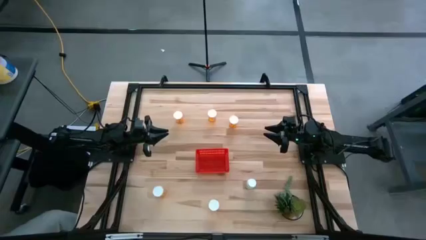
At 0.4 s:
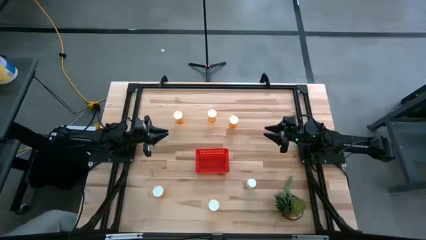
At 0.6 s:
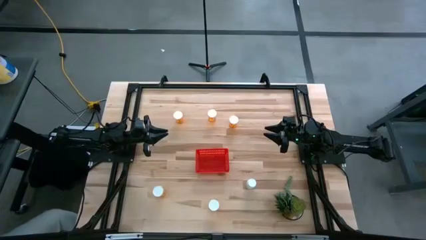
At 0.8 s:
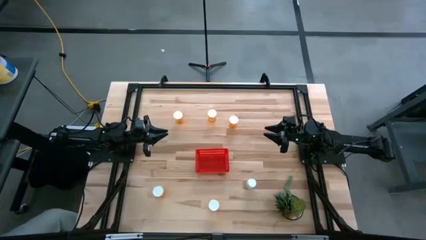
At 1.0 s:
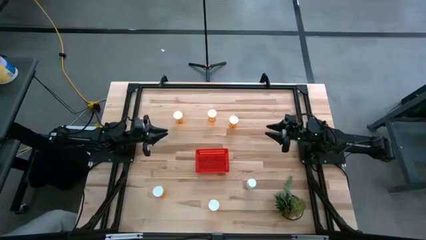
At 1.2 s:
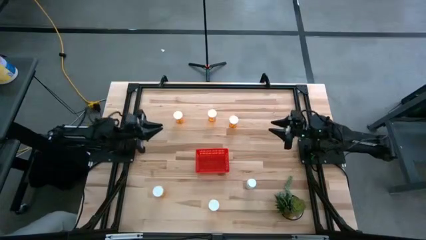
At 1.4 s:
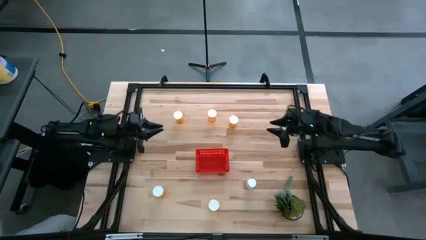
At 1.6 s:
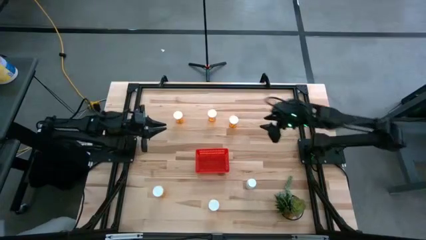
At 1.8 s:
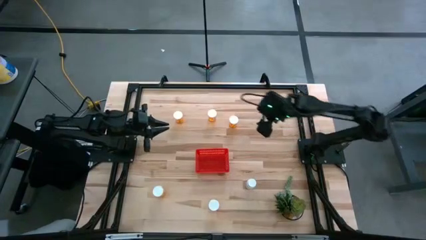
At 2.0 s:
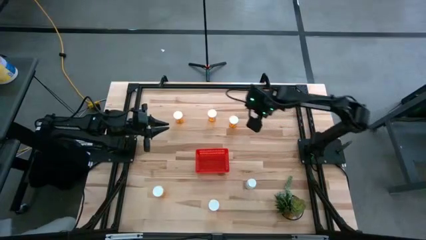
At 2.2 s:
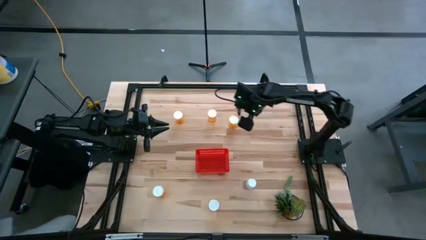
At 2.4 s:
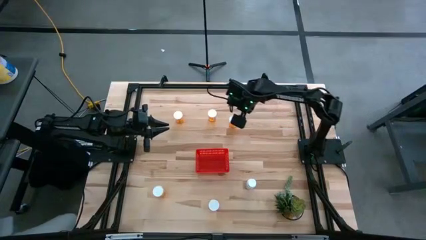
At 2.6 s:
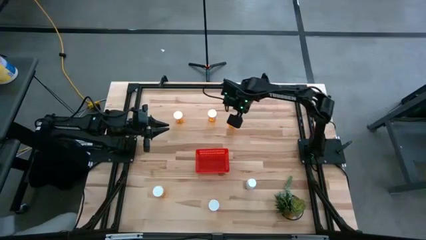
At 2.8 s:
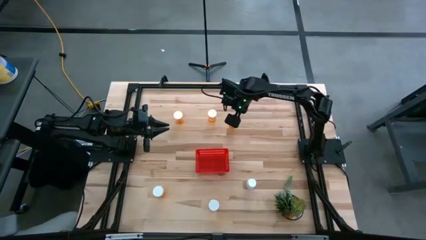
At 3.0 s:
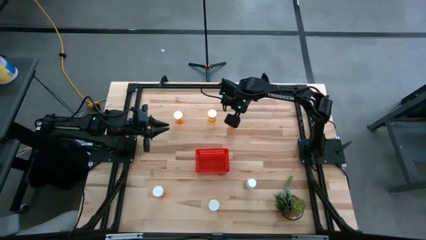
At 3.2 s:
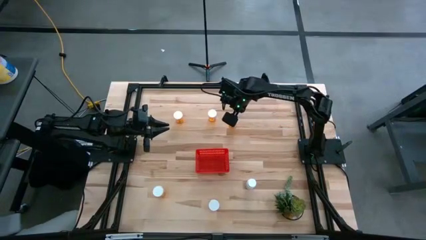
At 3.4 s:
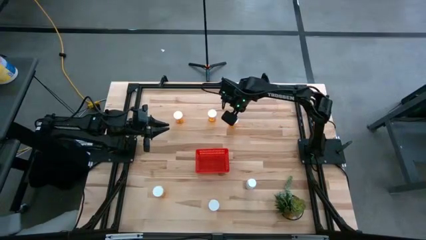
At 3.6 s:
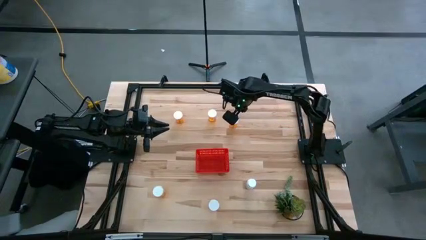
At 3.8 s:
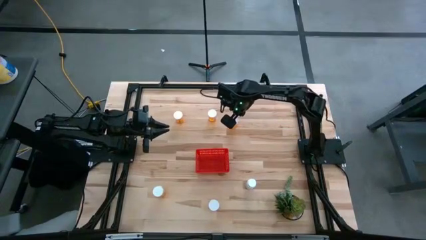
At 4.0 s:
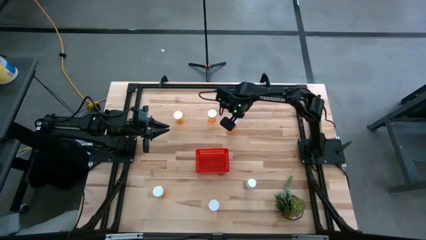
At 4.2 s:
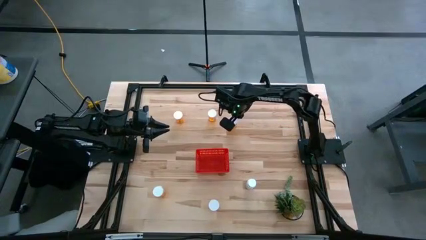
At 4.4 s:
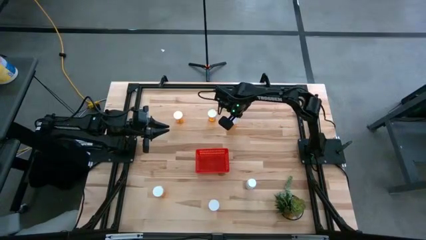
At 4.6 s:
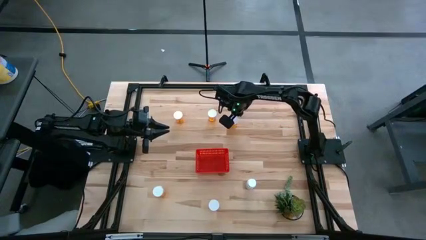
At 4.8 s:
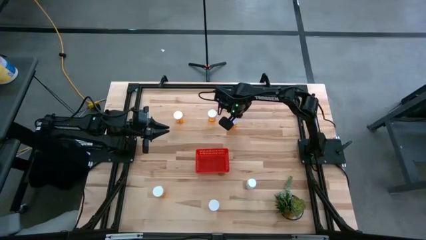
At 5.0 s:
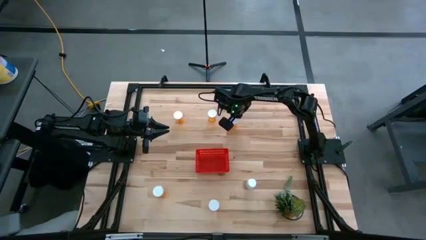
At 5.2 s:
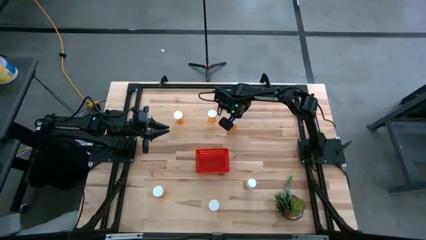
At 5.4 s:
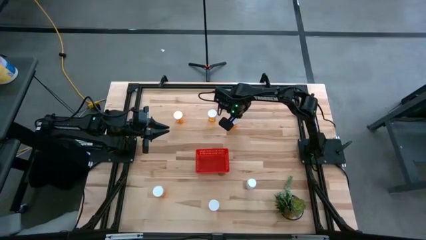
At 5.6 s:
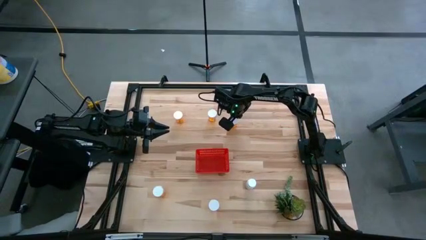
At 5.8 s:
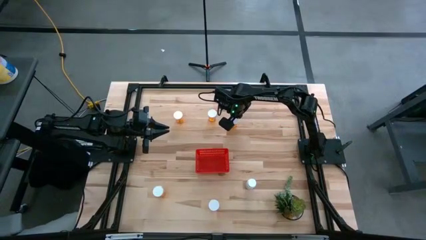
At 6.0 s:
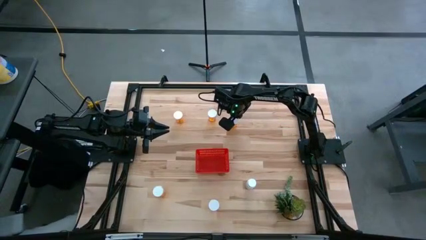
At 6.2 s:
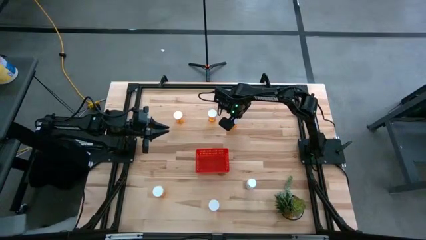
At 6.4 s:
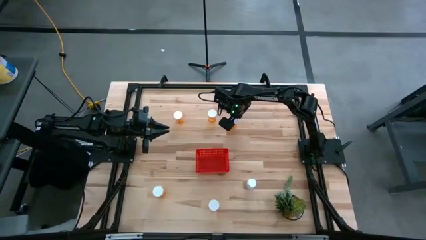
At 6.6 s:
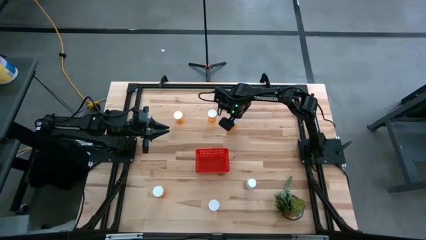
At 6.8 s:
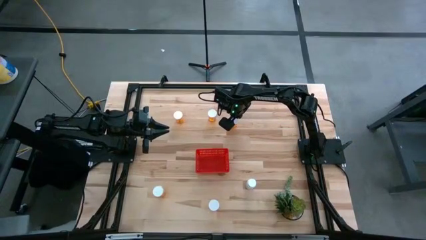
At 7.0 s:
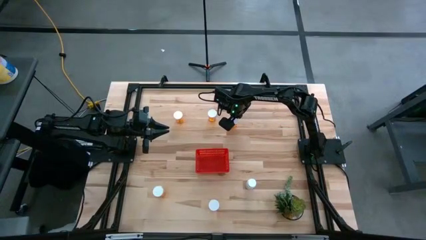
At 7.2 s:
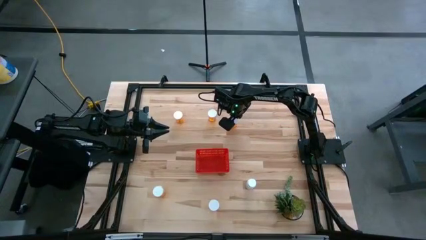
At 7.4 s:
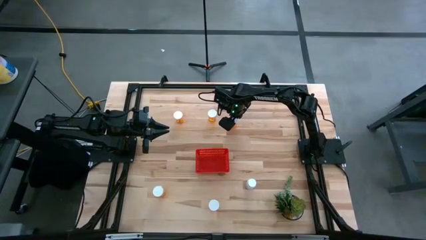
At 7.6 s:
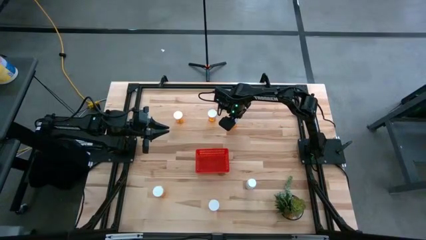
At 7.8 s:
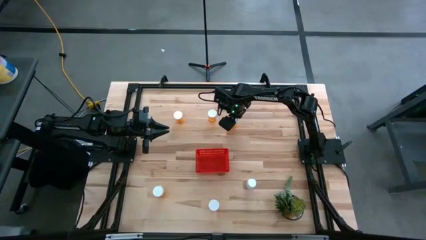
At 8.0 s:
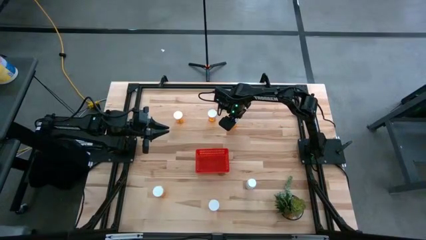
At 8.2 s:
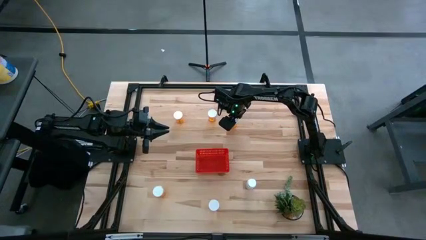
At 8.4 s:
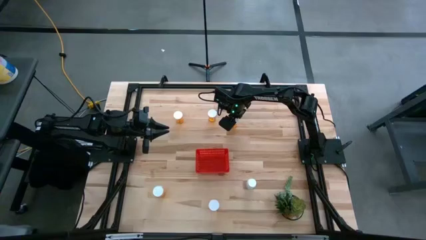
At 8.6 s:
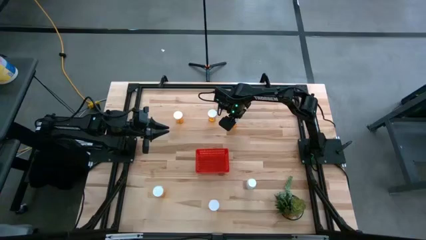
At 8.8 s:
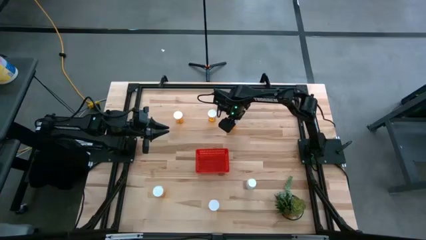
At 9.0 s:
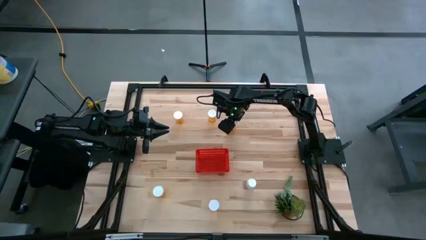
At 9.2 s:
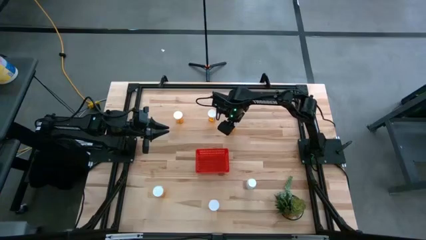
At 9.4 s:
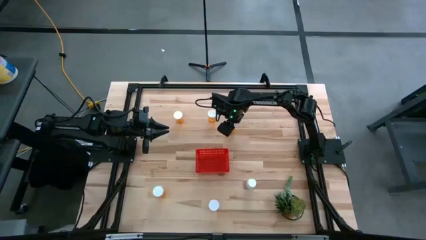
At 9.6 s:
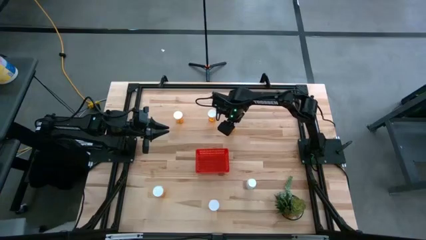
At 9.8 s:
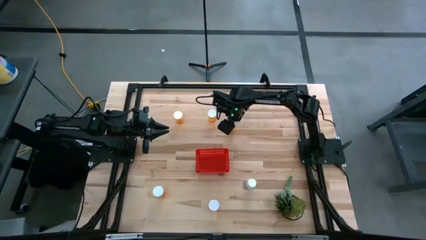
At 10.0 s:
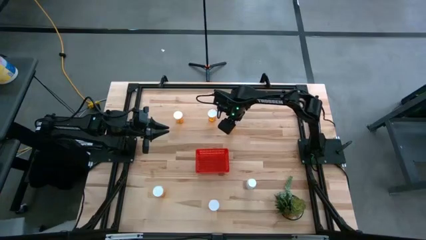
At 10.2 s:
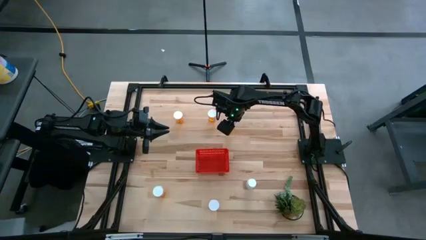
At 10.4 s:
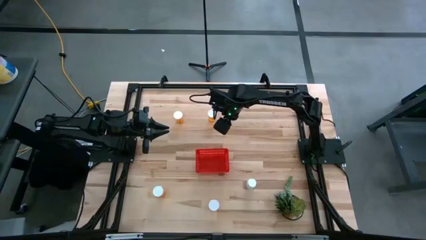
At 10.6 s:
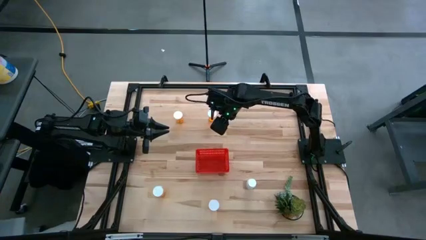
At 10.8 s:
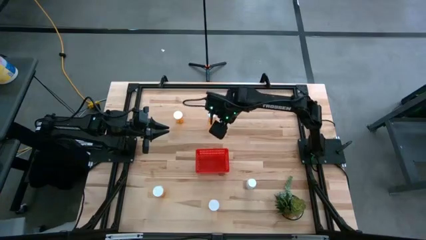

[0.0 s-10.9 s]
Task: Pick and place pill bottles into a basket
Put the orange pill bottle into the red basket

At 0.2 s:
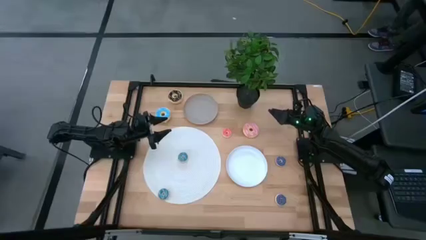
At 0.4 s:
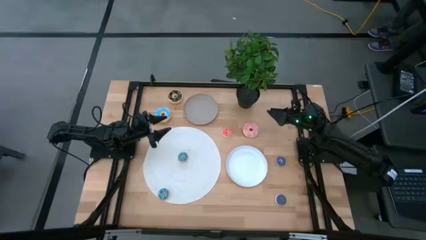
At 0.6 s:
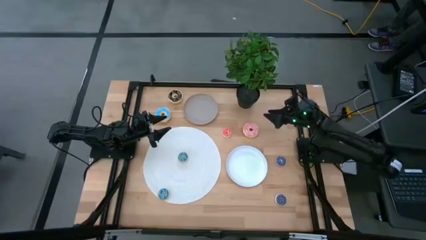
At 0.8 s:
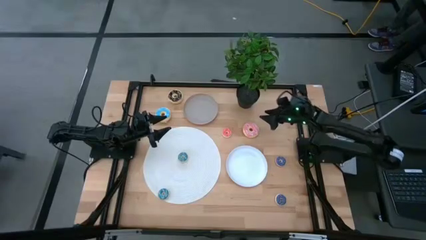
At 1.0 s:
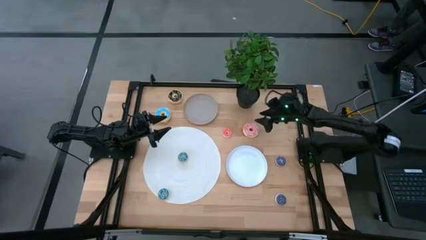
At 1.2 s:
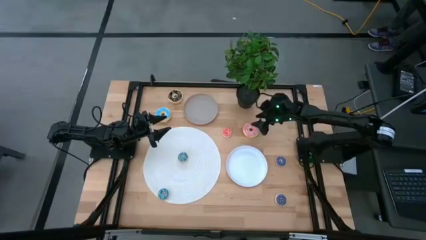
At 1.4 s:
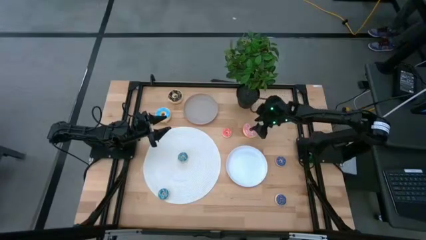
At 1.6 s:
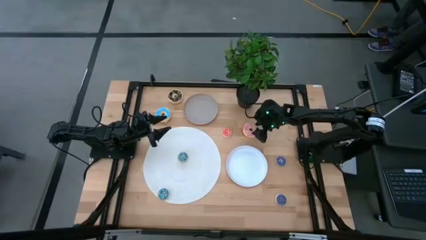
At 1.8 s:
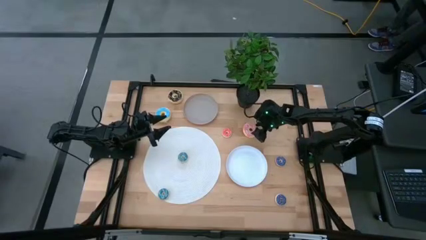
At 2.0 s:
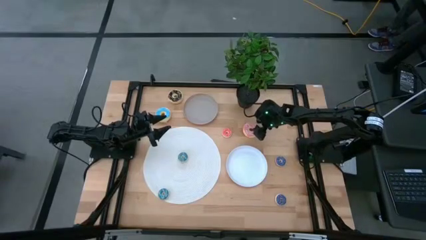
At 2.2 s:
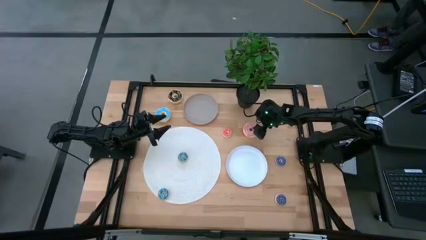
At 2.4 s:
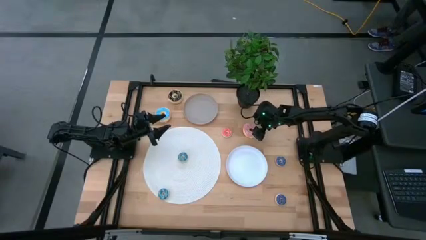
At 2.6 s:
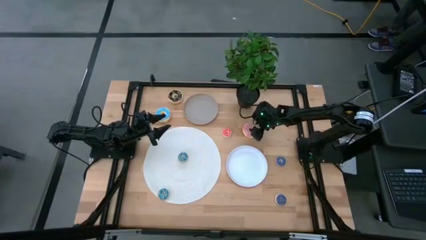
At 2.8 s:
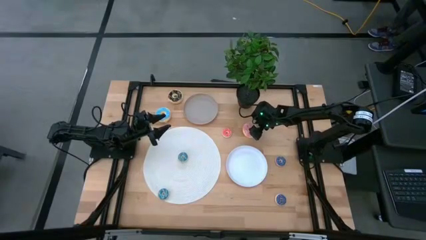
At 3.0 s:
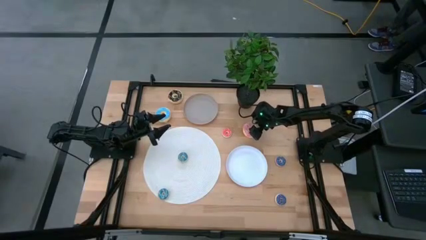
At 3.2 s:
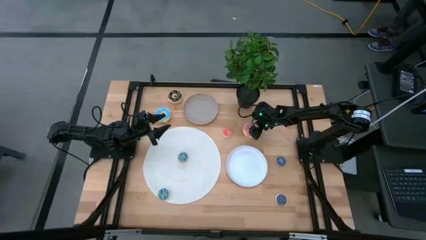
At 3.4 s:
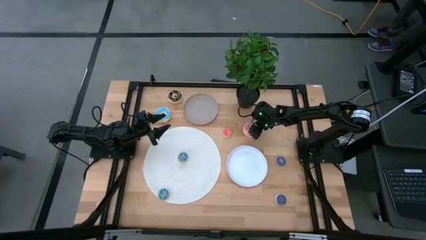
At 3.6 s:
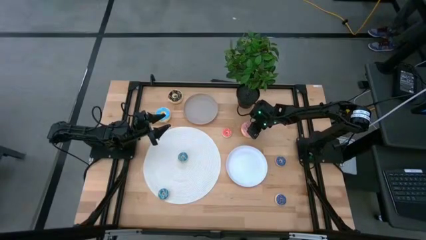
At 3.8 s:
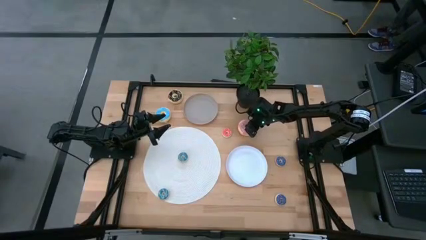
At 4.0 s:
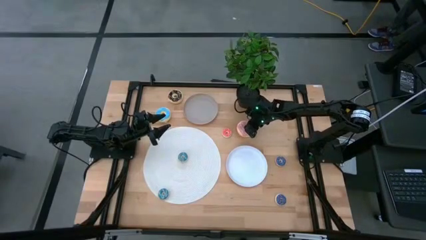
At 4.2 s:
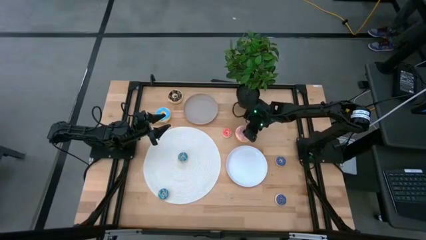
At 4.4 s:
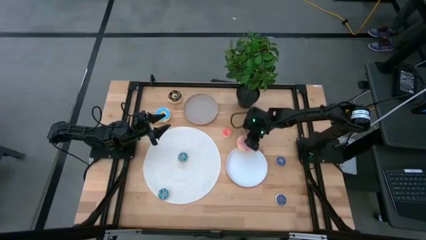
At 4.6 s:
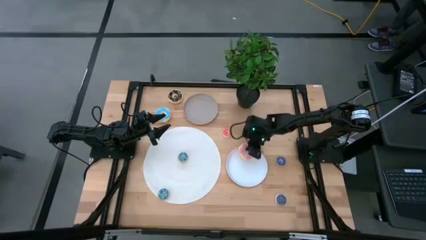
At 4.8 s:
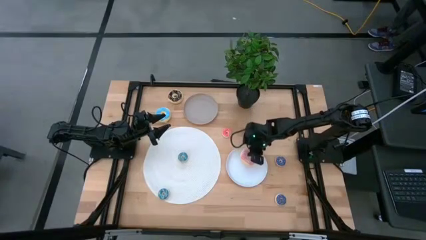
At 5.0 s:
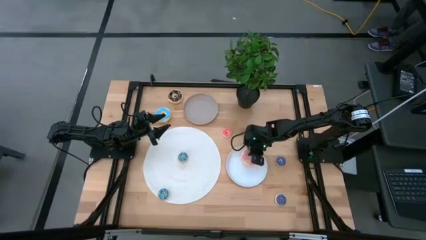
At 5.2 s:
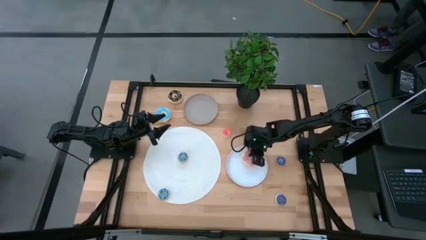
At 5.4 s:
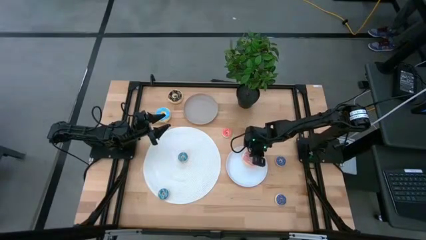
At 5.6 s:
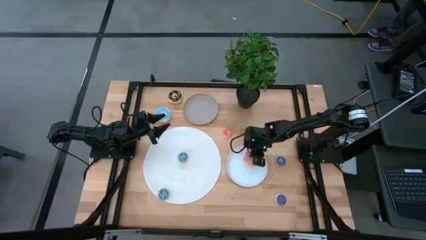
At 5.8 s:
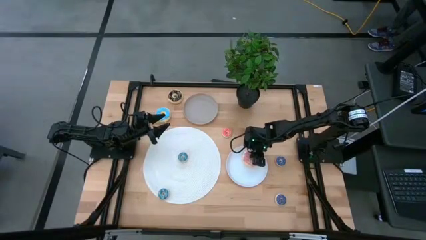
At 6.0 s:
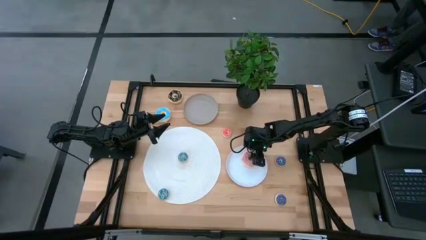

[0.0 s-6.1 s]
Task: Pick & Place donuts
Put the large pink donut on the white plate
